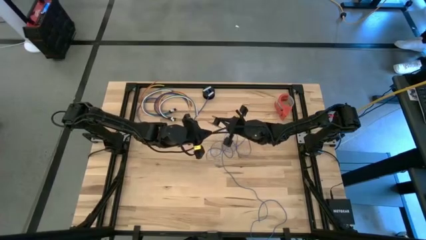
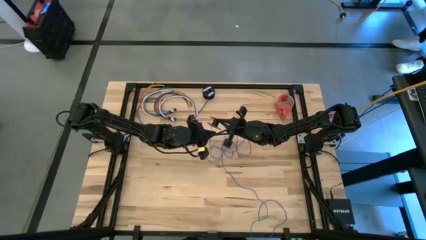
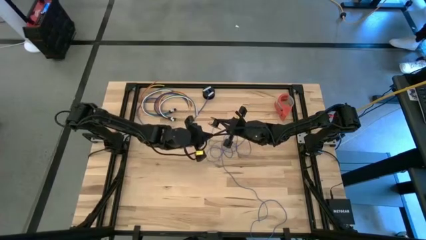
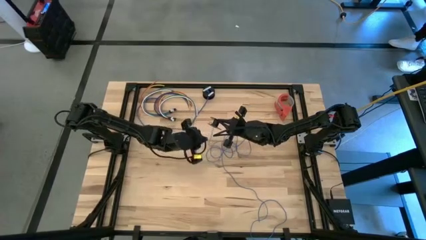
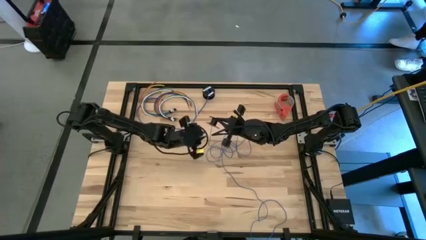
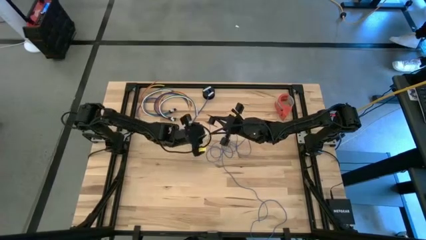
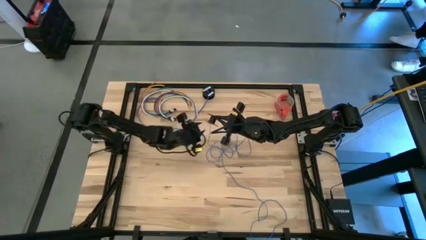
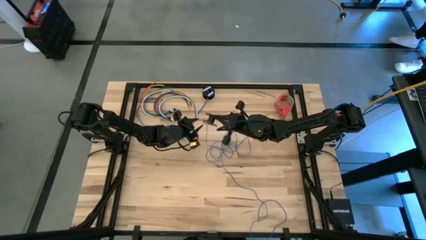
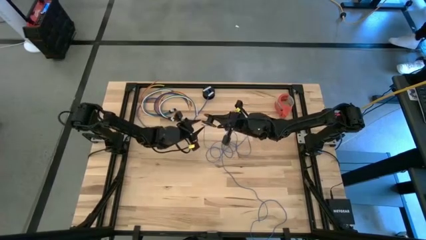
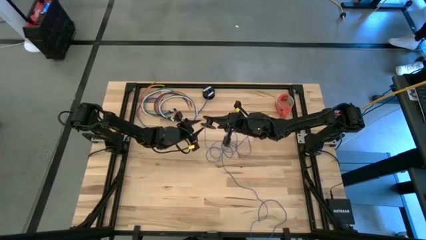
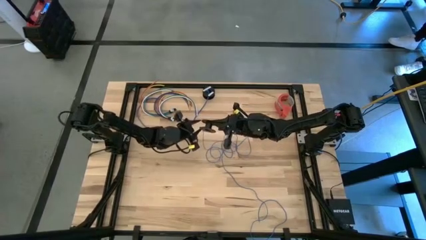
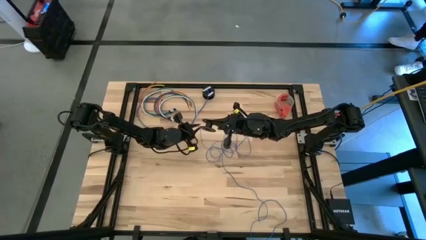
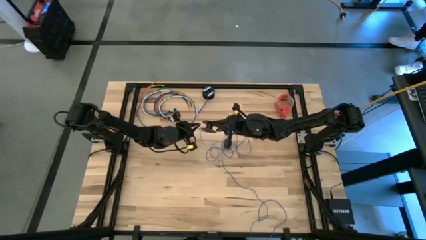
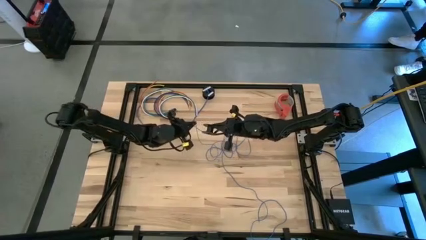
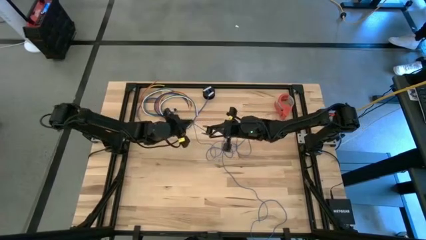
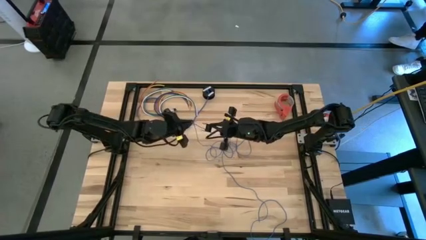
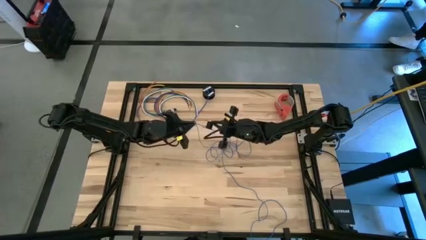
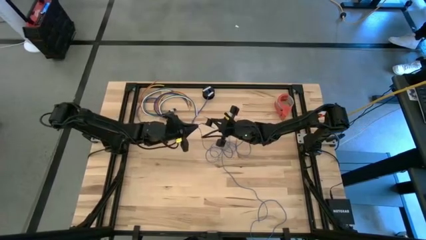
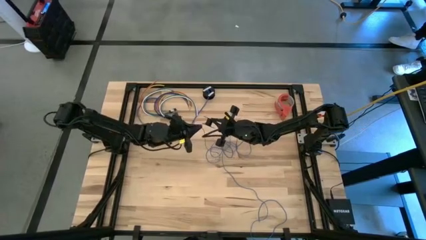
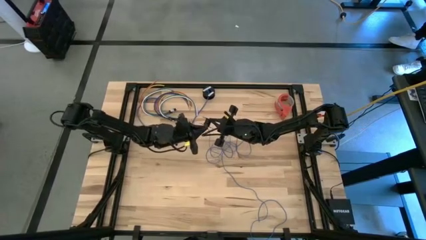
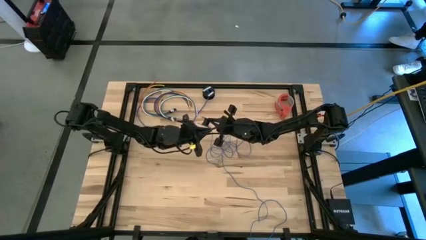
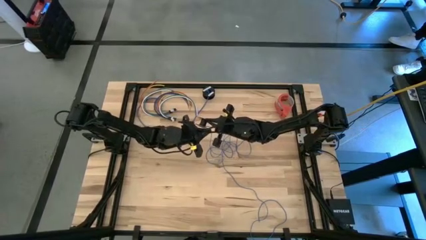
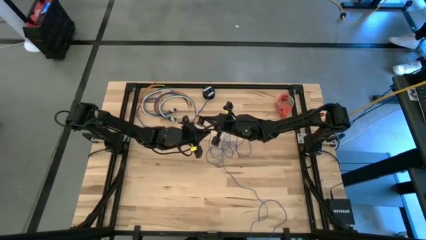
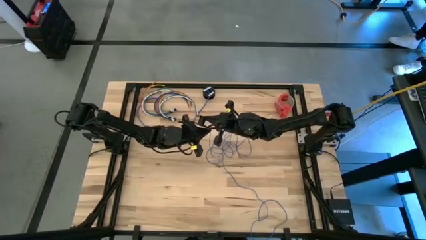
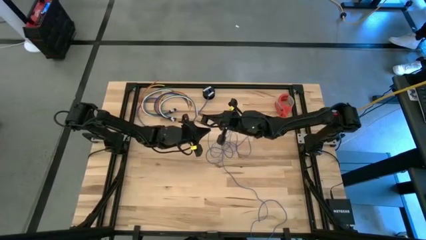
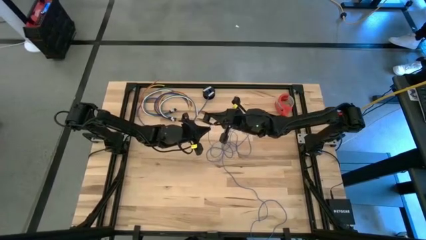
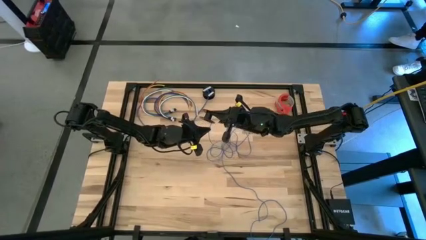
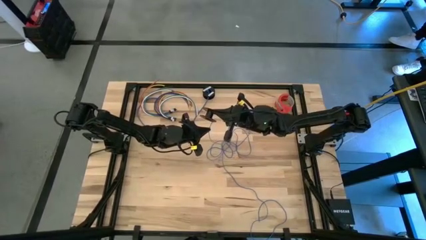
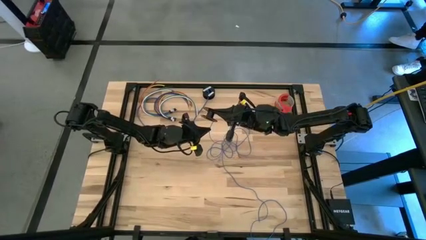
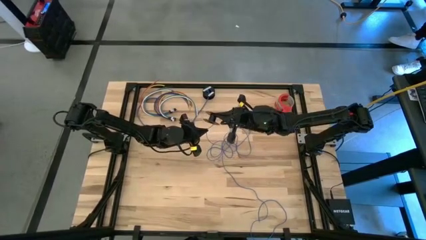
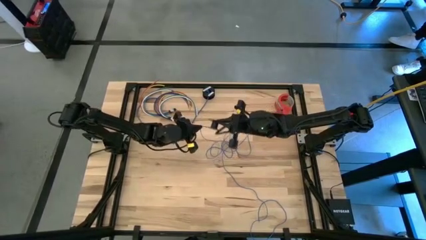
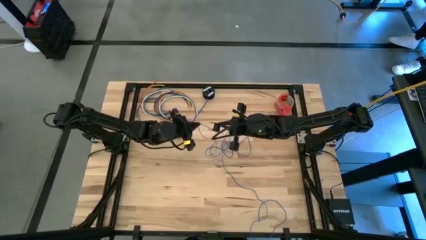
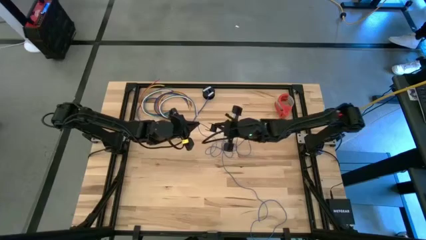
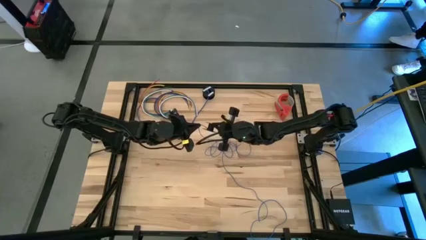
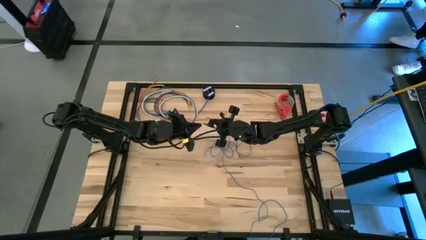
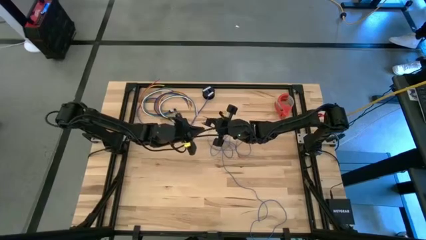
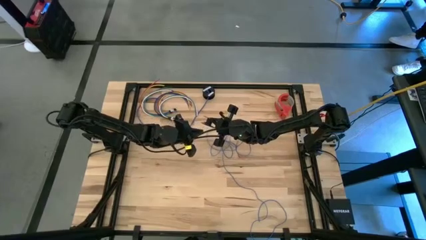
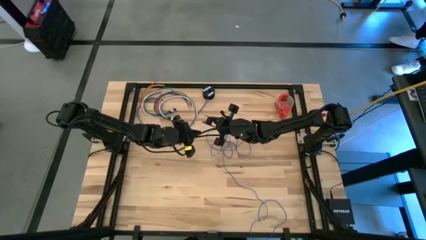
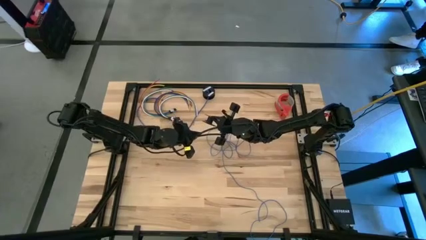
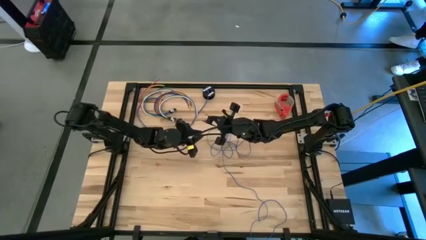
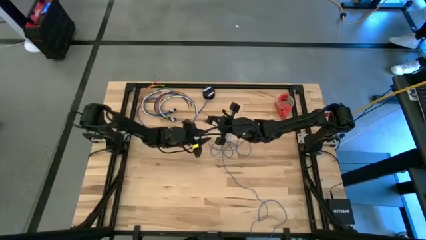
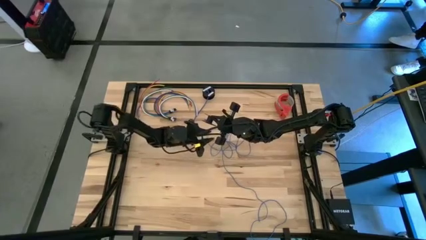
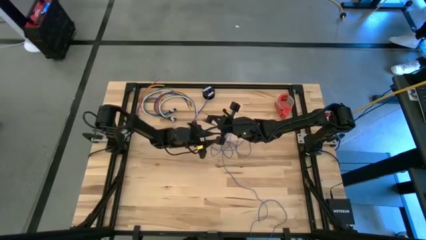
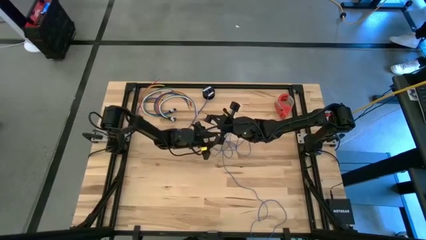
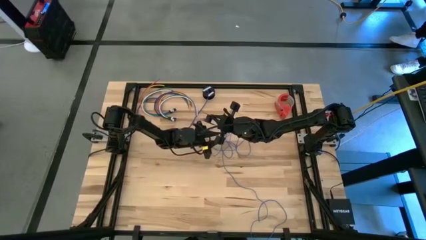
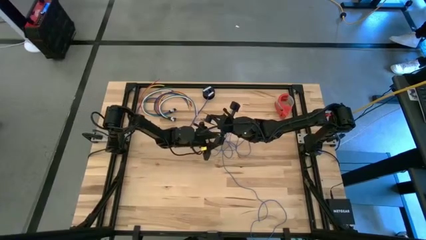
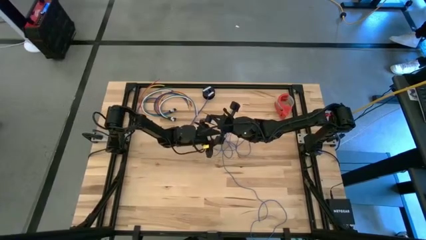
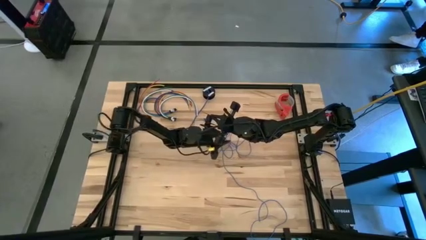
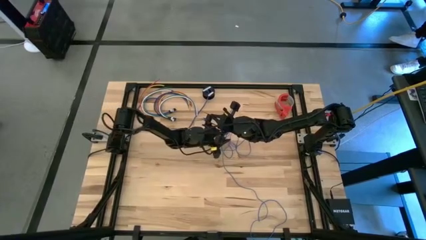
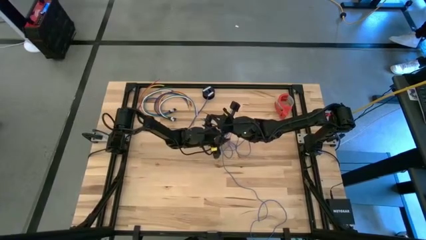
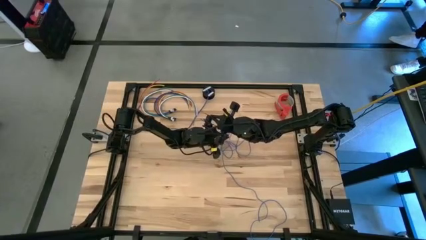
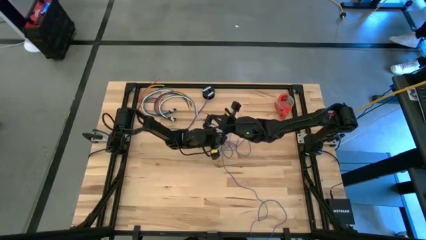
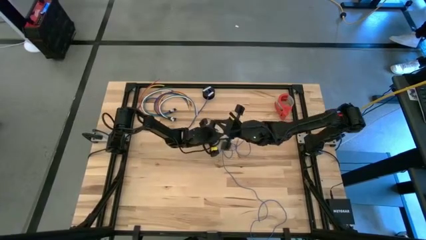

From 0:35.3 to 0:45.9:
Task: Coil cords
Coil the blue wire onto the black spool

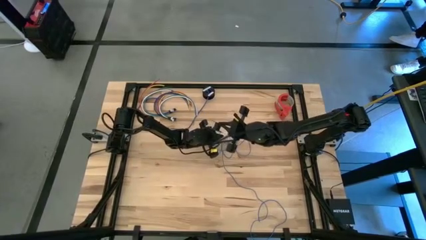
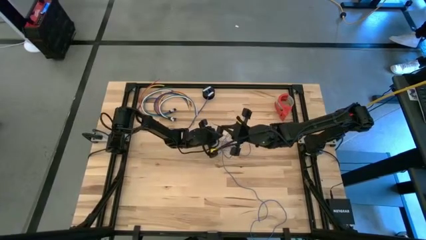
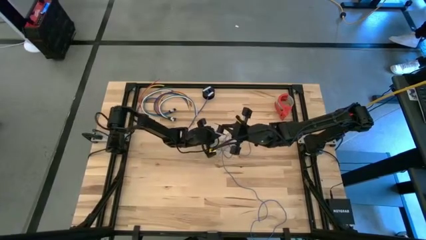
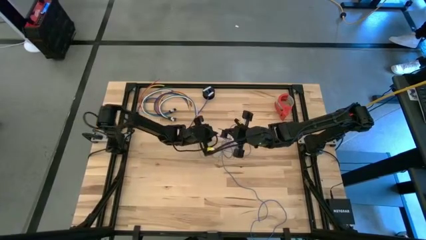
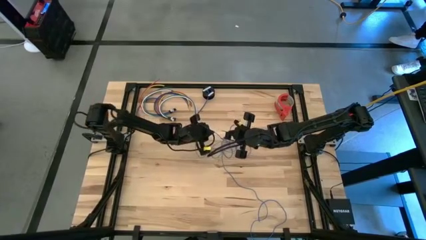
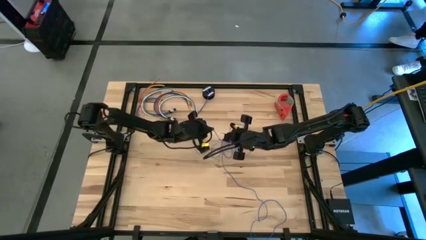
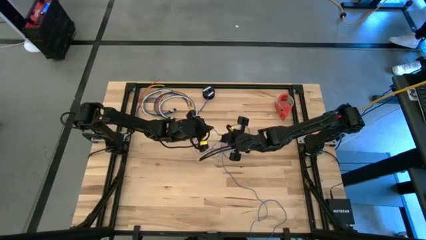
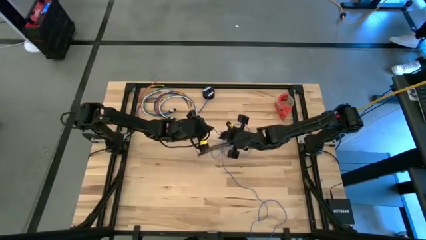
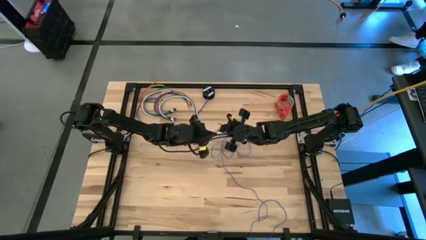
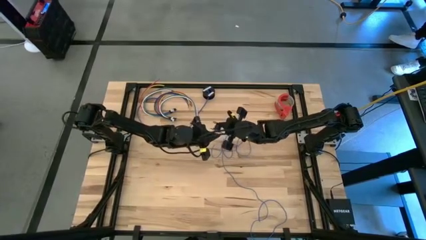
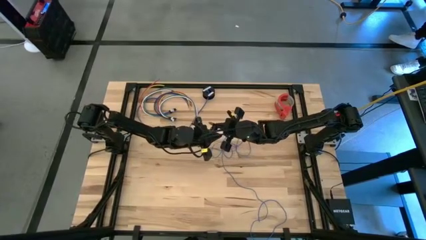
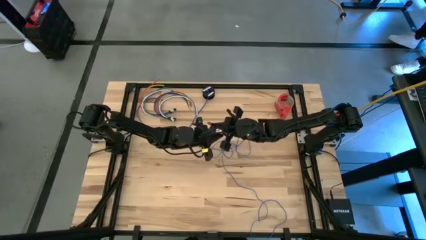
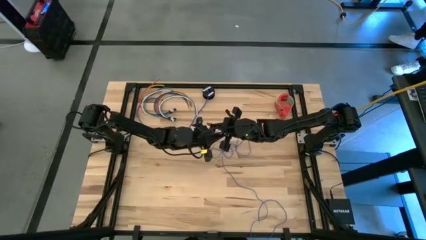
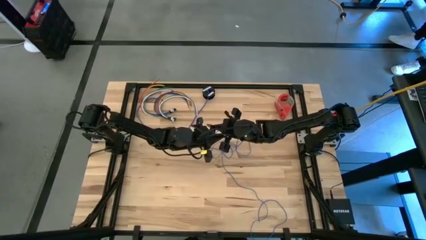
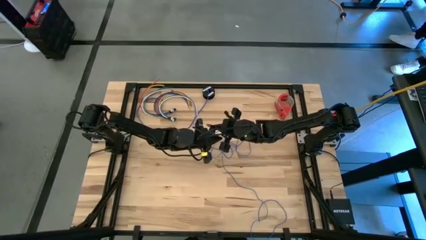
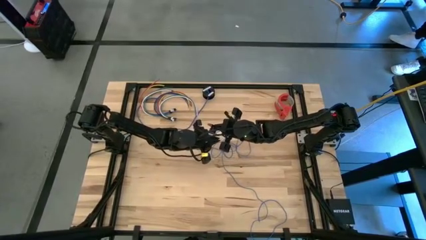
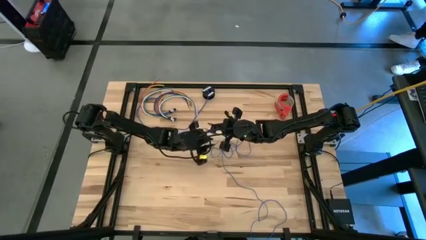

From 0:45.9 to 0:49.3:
Coil the blue wire onto the black spool

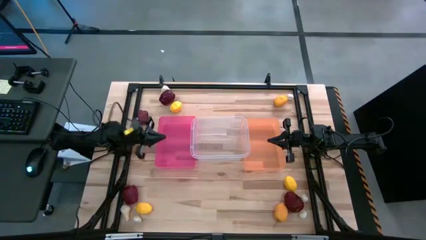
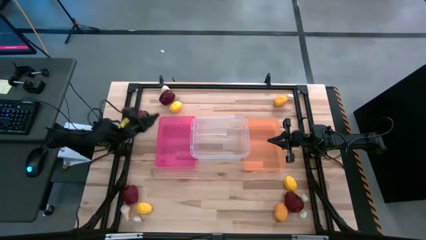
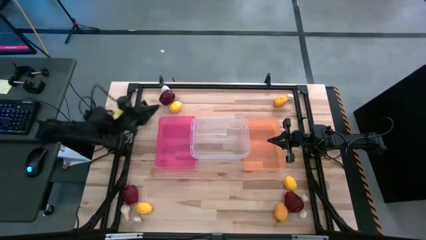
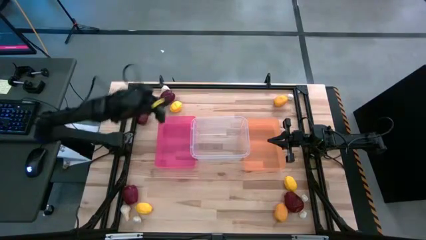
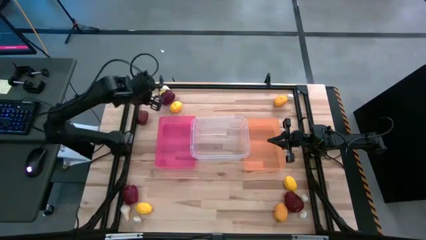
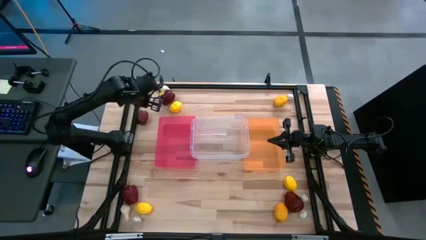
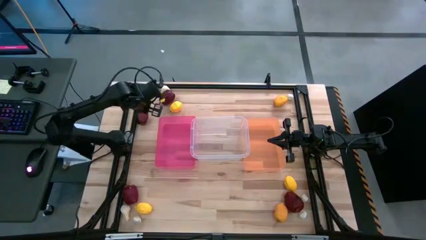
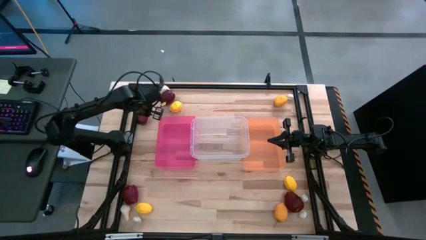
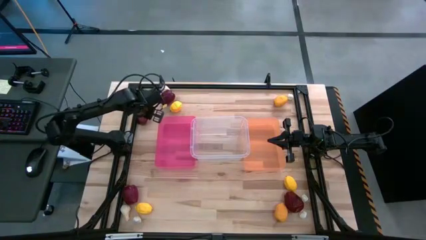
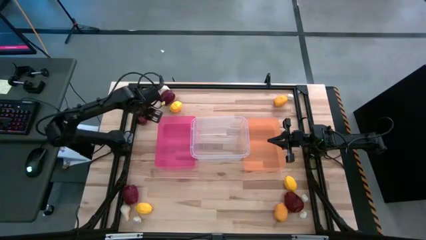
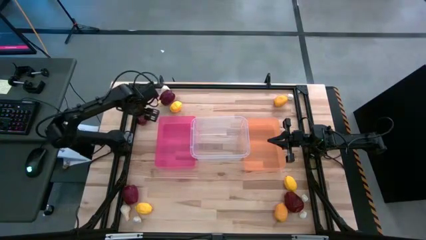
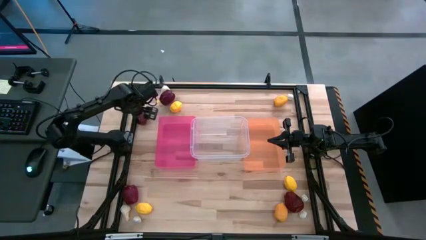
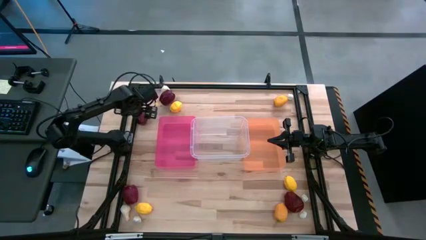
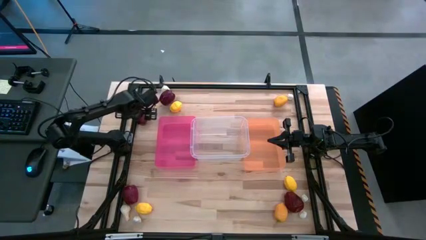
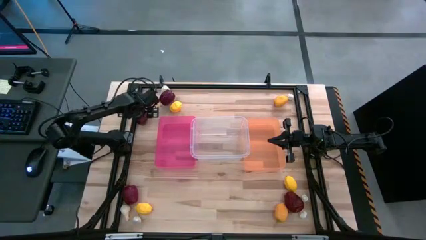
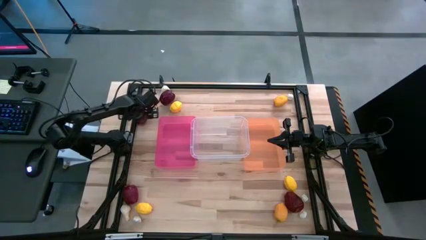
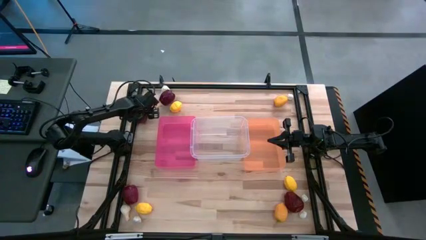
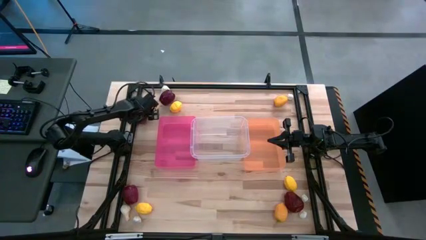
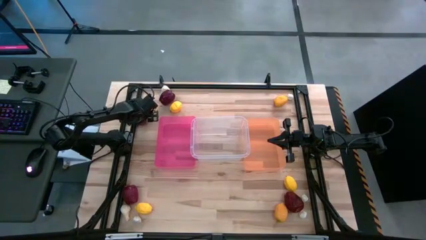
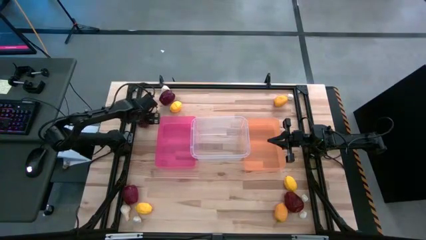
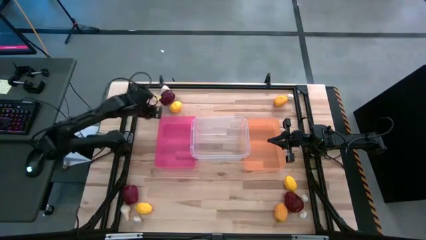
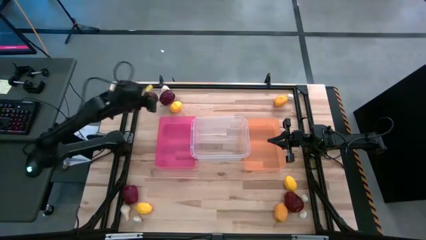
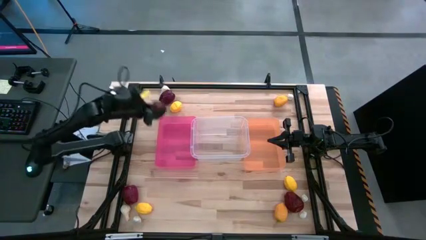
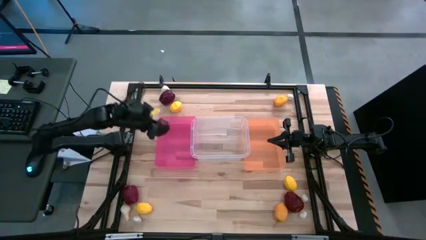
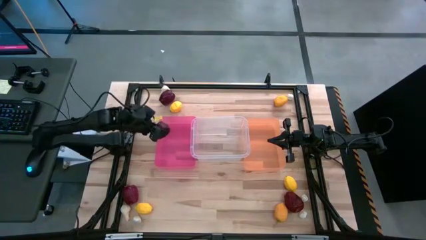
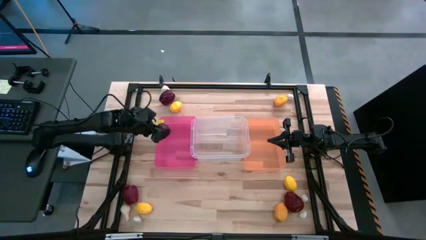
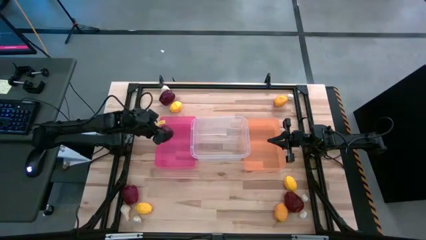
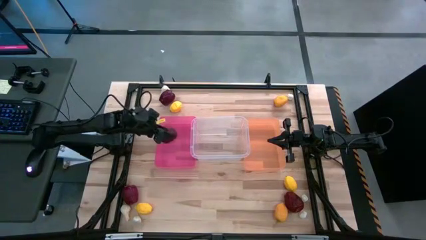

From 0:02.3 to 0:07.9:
Task: Sort produce into baskets
Put the red apple into the pink bin
